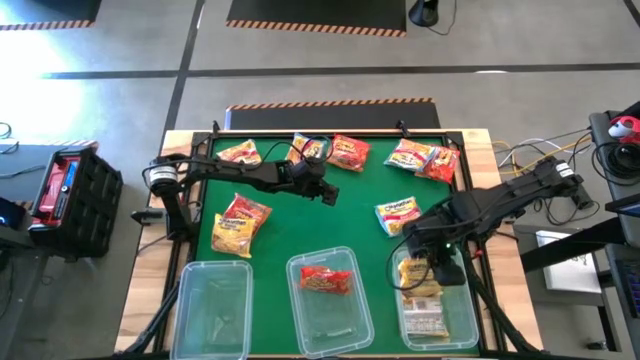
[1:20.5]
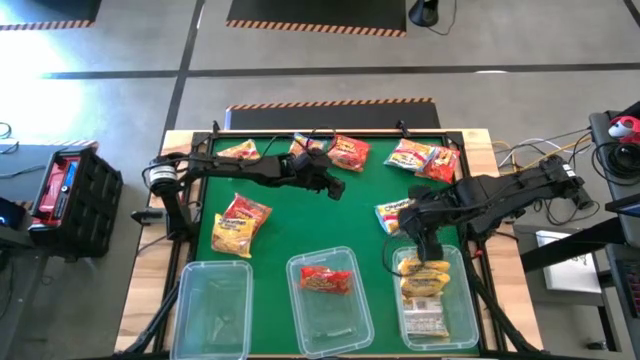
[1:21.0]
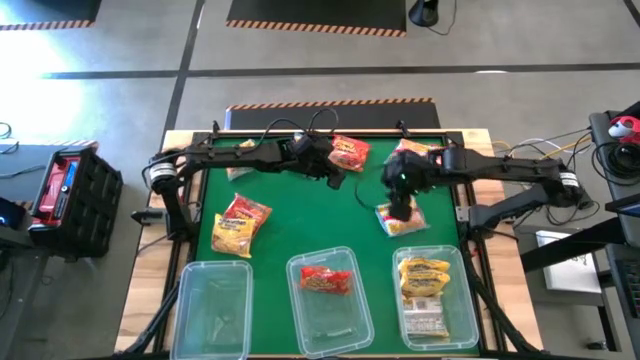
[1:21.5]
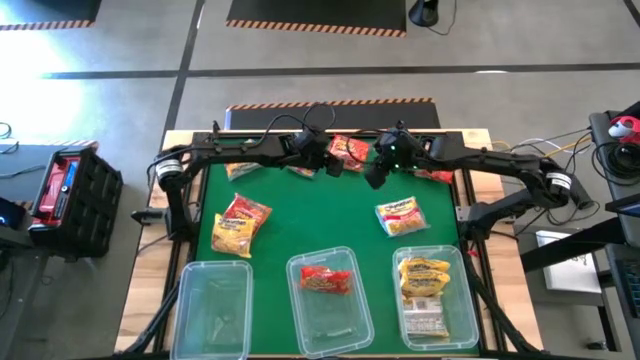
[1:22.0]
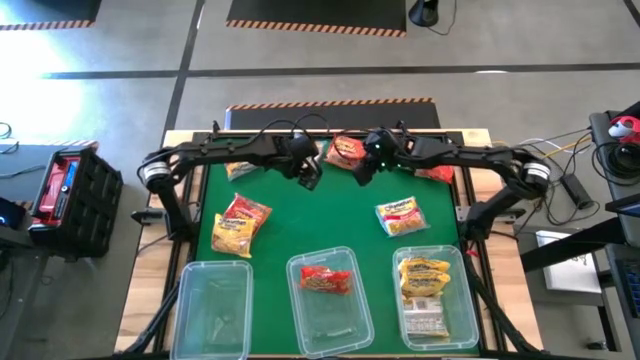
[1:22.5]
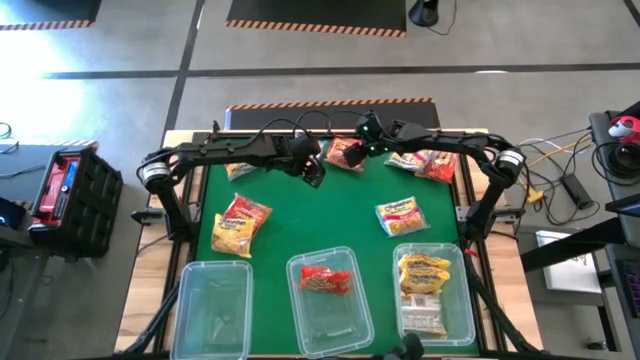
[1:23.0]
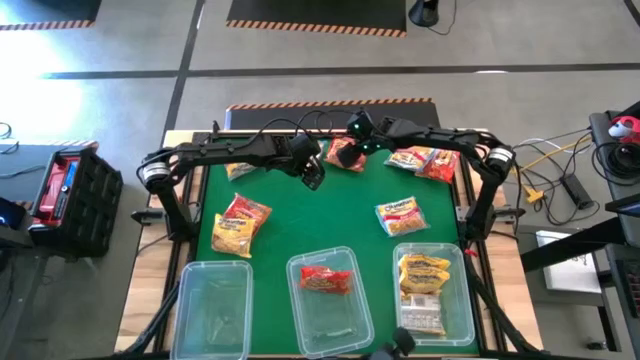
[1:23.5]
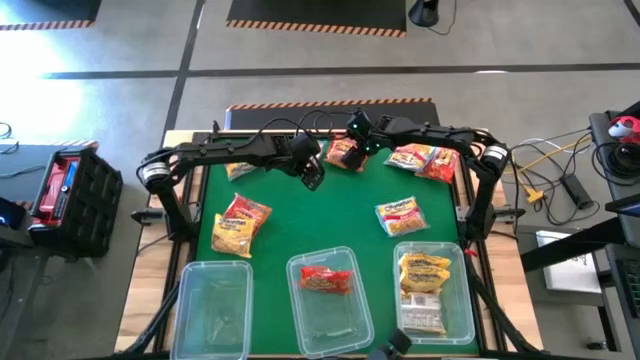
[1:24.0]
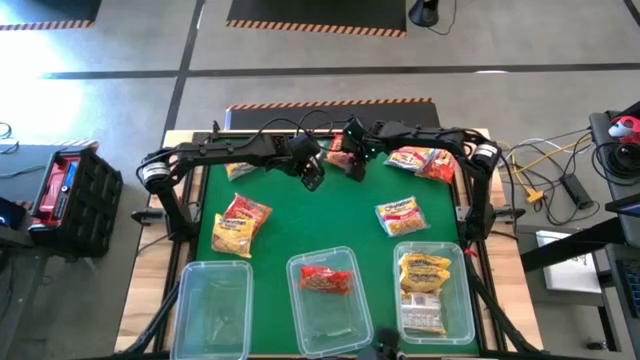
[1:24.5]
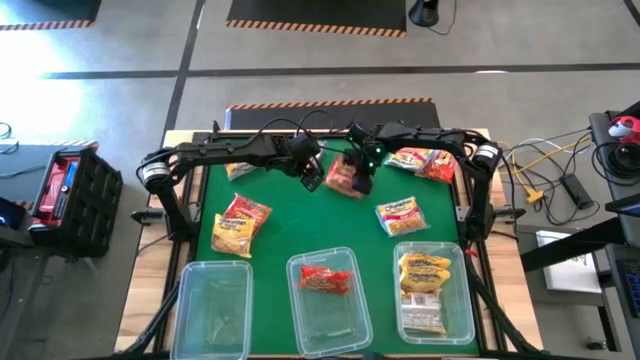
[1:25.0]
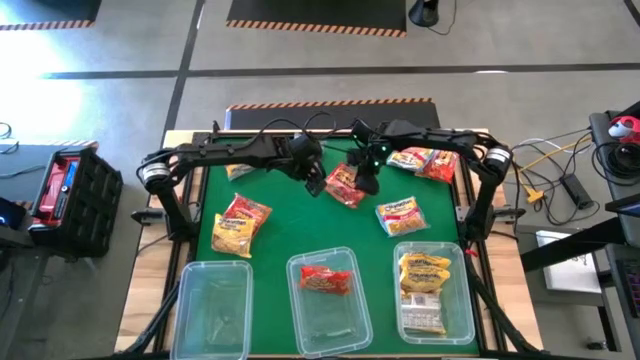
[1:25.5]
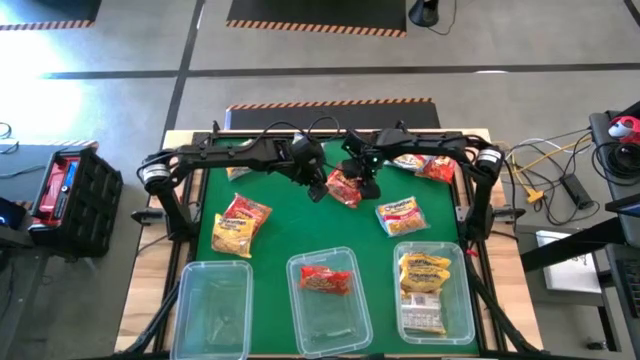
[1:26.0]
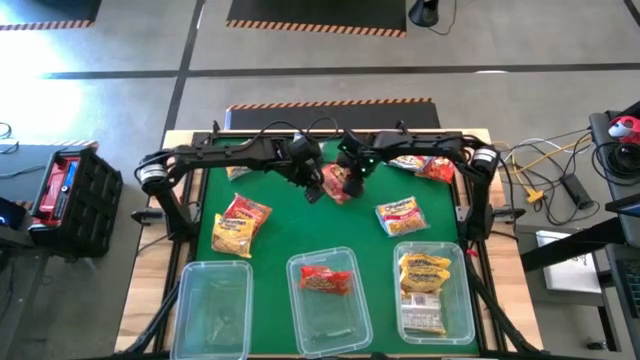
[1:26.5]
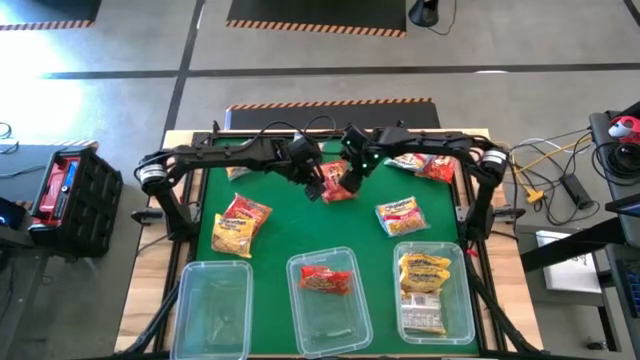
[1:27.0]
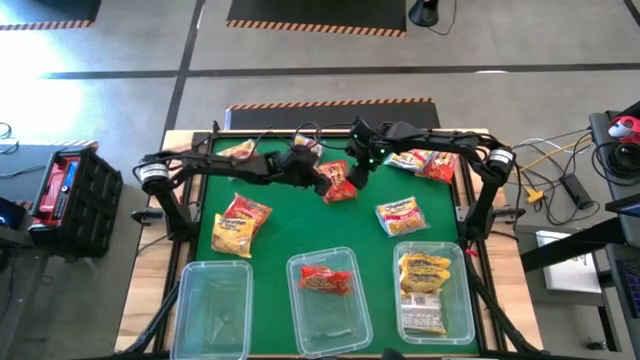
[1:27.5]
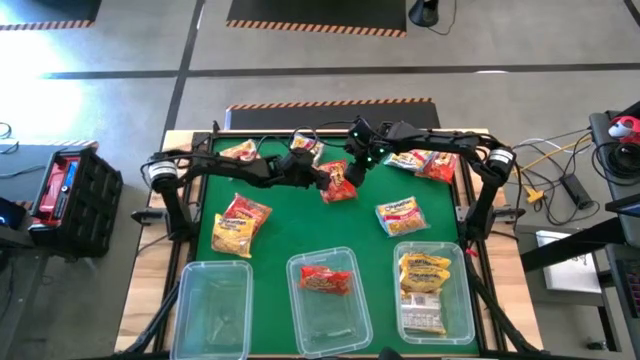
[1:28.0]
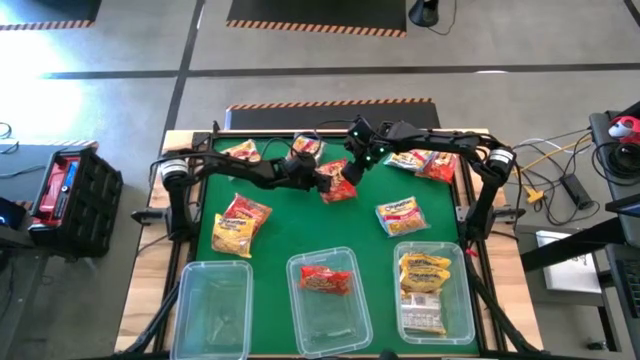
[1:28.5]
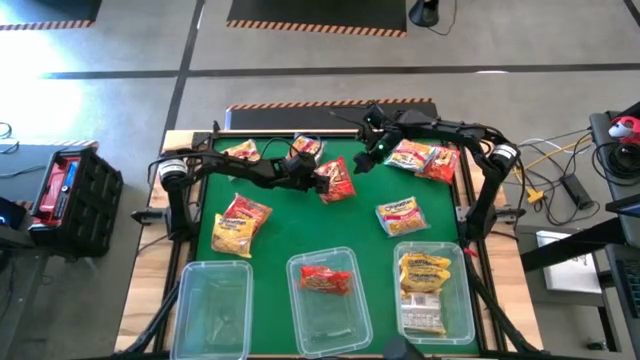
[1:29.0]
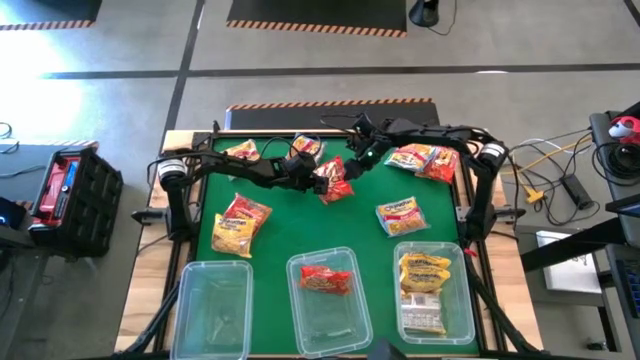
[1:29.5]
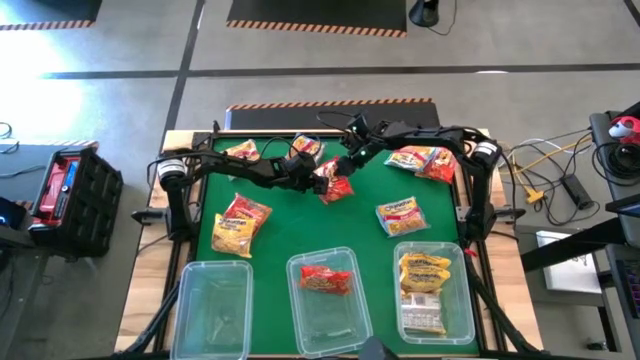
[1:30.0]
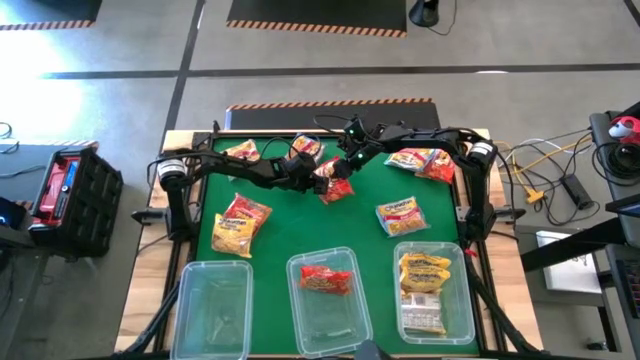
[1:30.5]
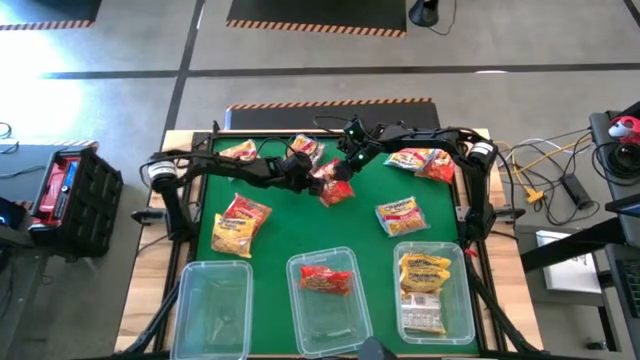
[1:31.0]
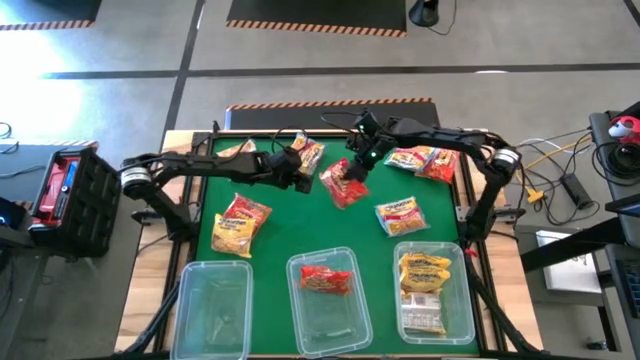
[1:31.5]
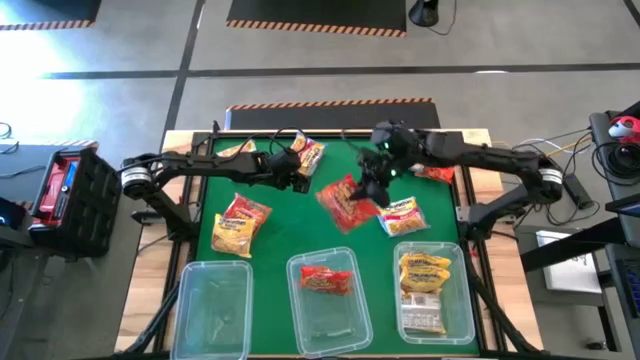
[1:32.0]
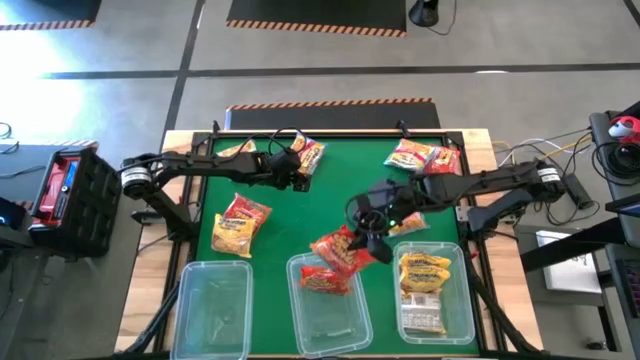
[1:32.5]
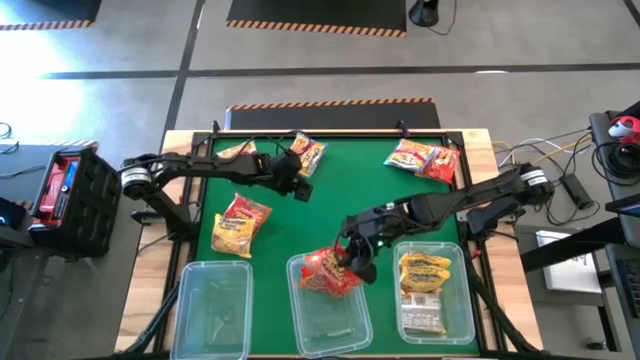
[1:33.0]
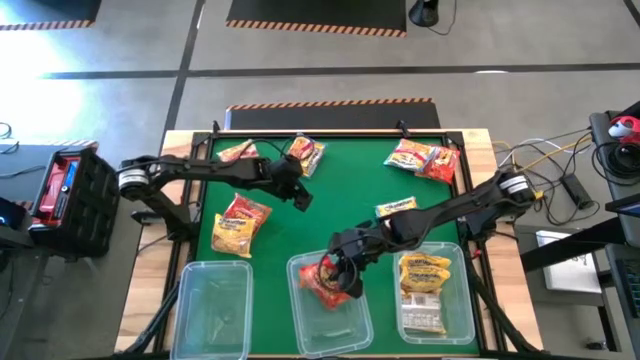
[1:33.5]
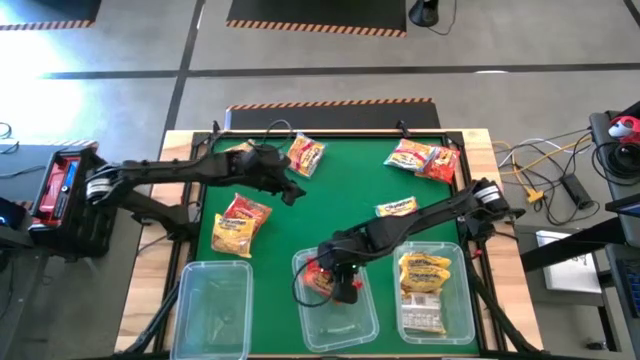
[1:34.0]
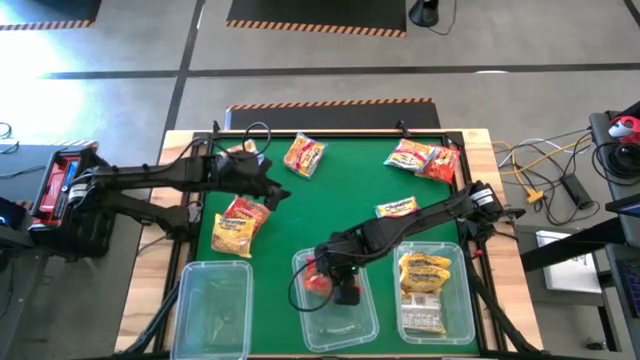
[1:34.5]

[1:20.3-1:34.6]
Task: Sort Maruchan noodles
Put the orange noodle pack into the middle transparent bin

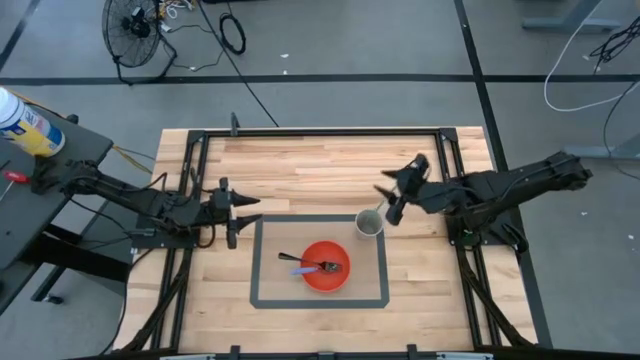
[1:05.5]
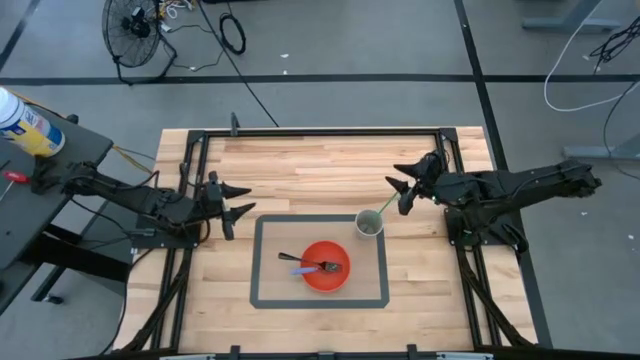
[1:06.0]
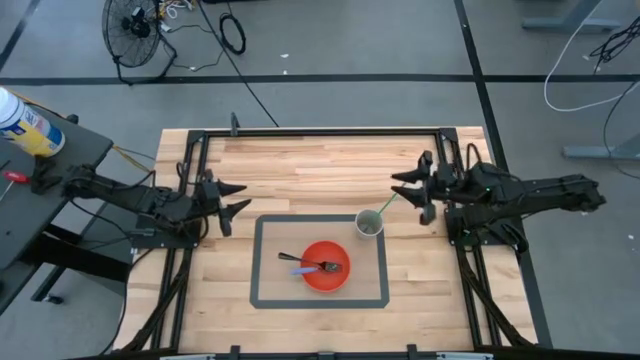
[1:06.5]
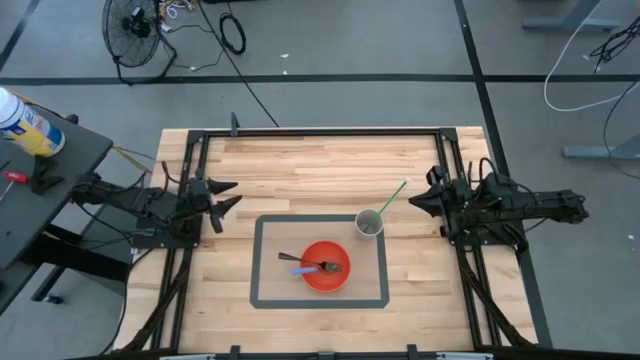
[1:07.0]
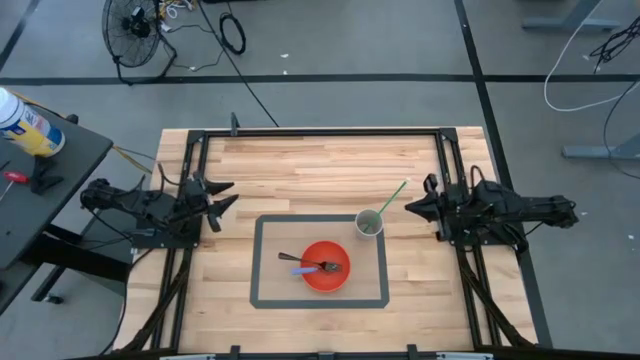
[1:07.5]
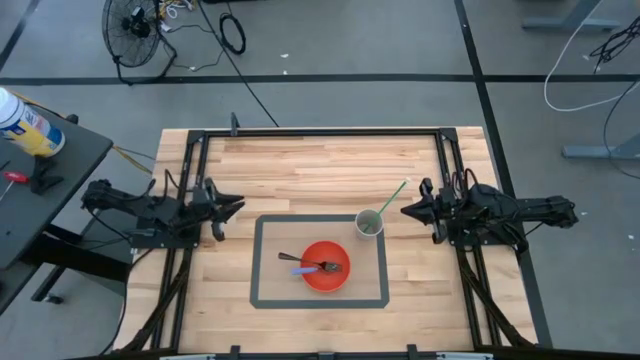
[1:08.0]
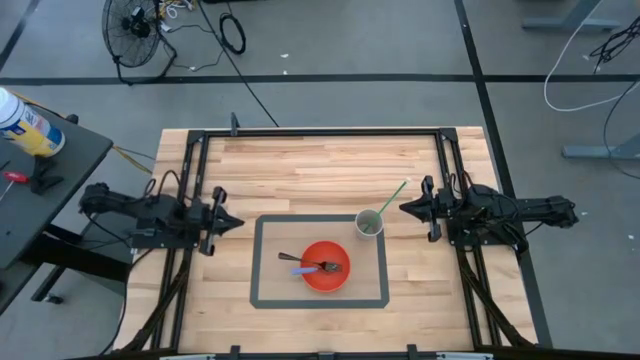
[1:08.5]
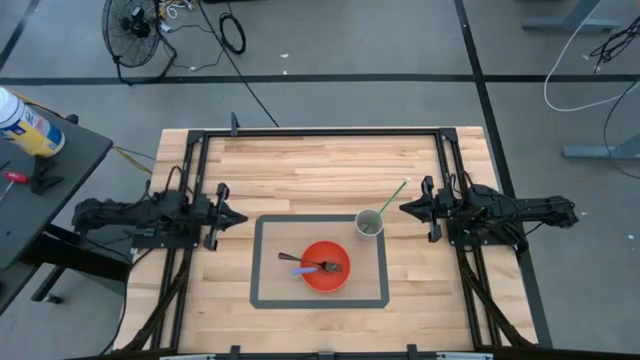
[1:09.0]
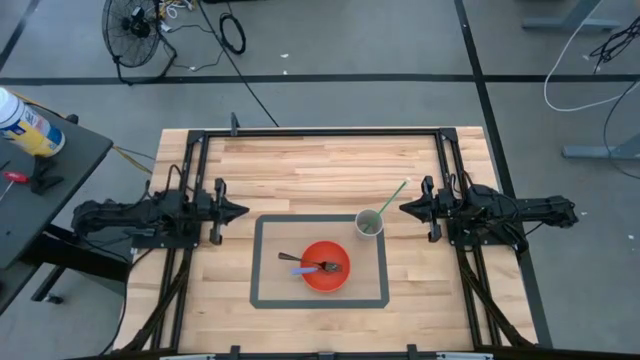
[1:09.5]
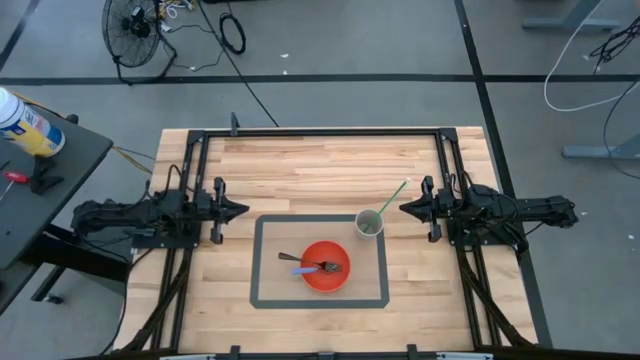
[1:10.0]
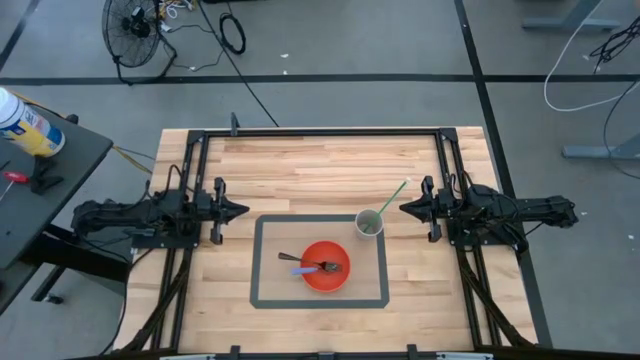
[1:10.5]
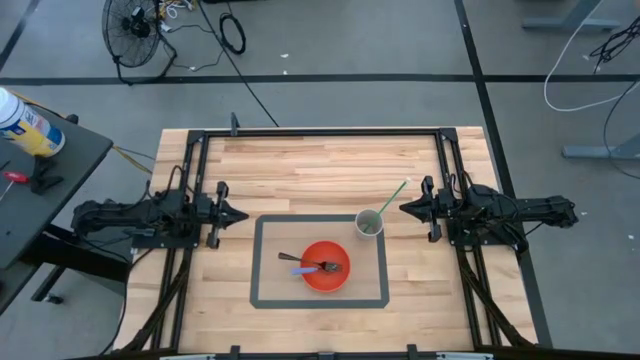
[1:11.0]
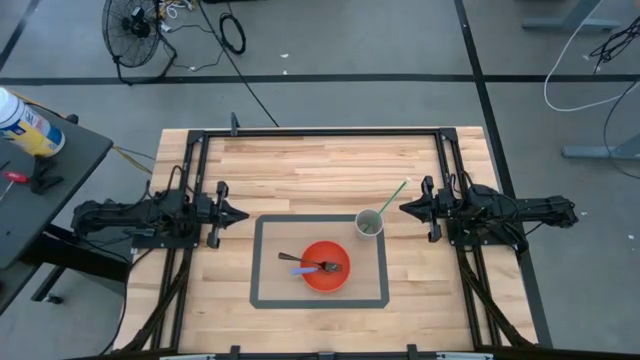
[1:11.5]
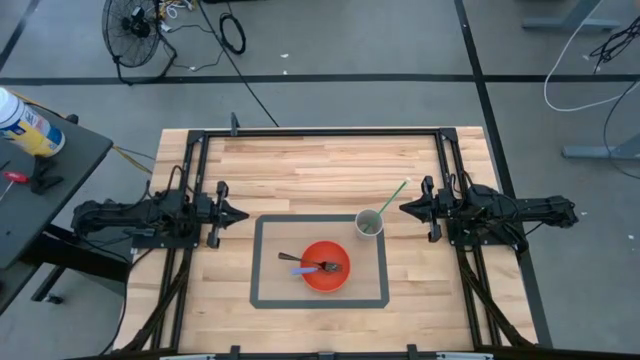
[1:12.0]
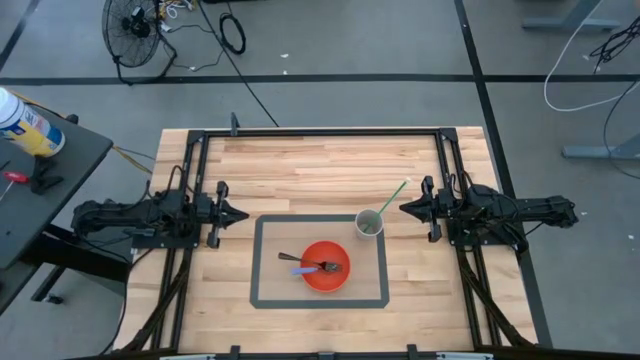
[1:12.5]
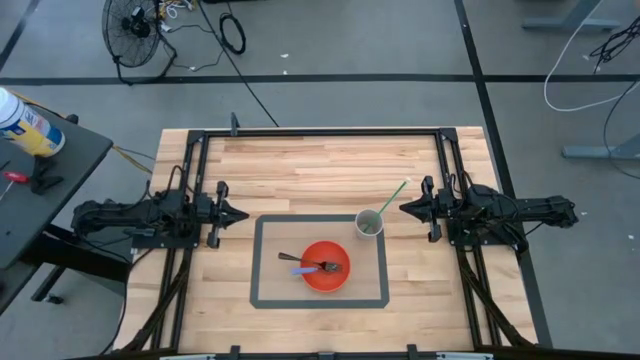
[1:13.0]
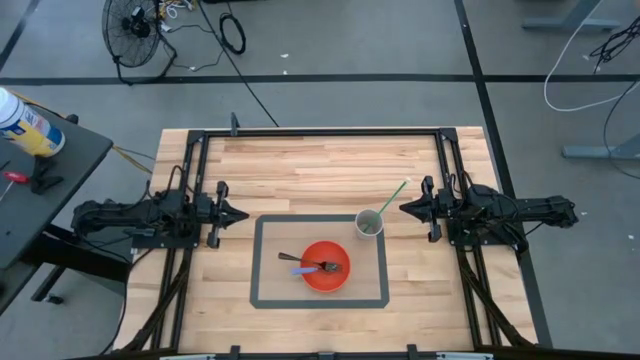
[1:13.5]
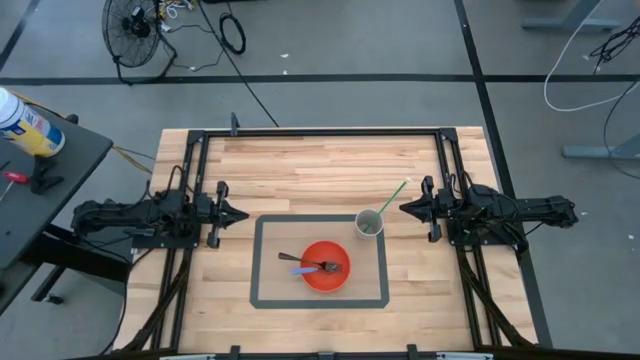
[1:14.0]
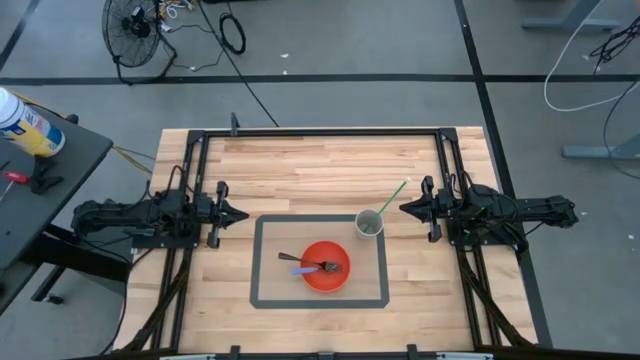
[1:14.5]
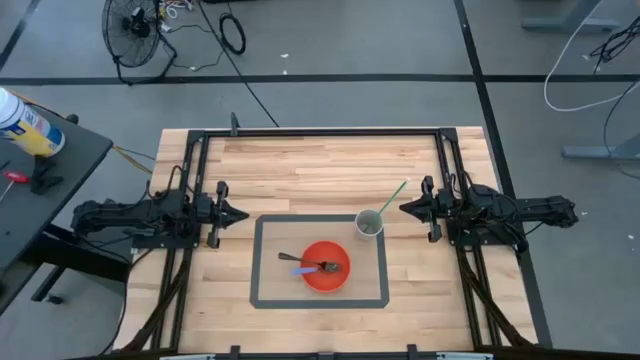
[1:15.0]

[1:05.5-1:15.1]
Task: Pick & Place Utensil
Return to Home Position
